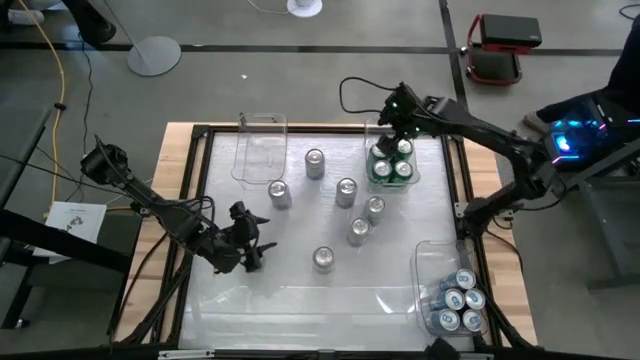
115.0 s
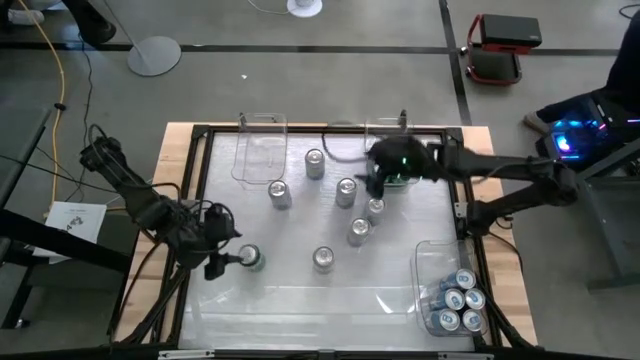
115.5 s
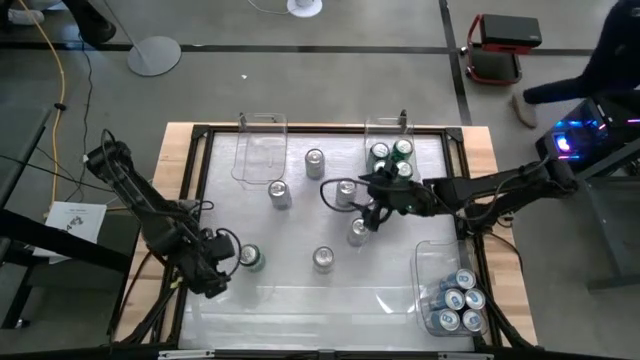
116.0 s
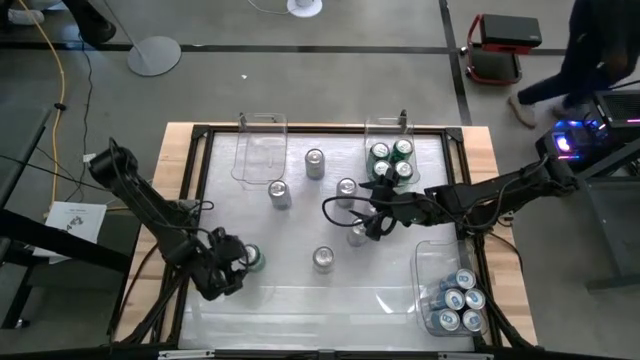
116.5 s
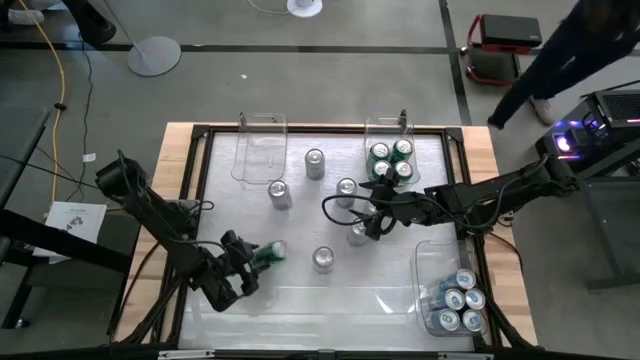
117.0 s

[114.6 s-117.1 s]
Task: Sort soda cans
Put the green soda can into the top right transparent bin

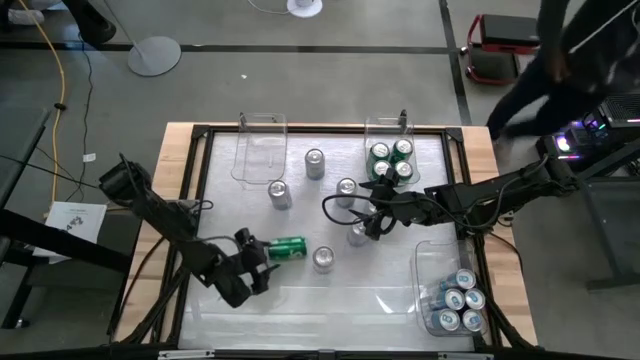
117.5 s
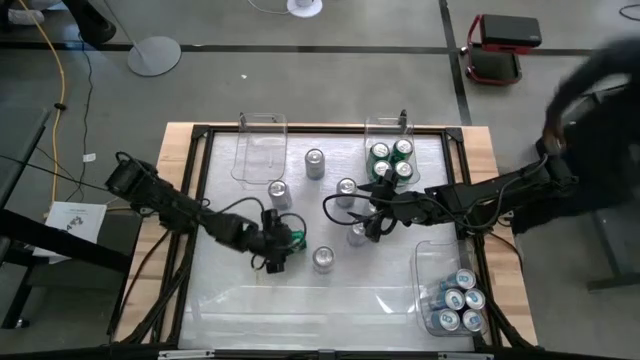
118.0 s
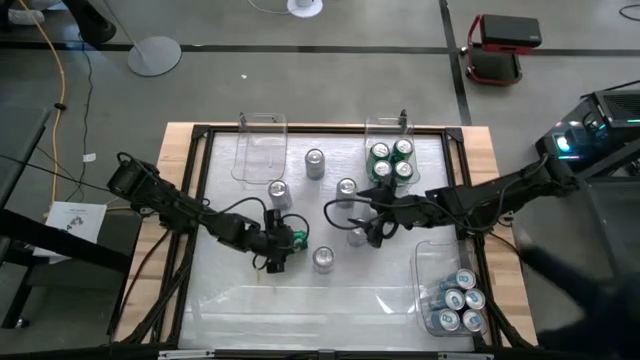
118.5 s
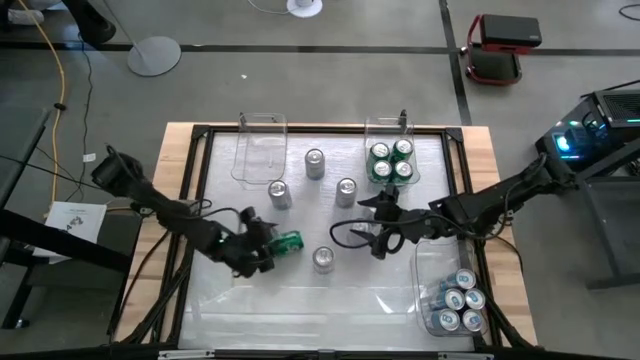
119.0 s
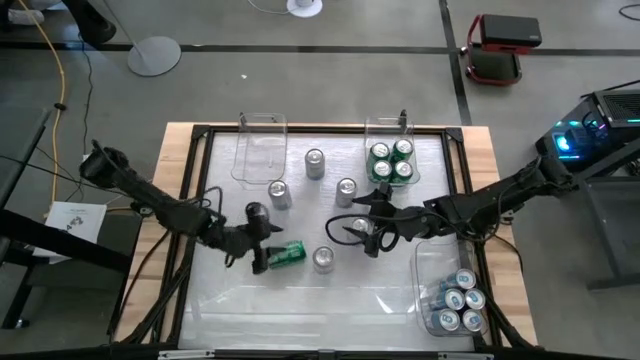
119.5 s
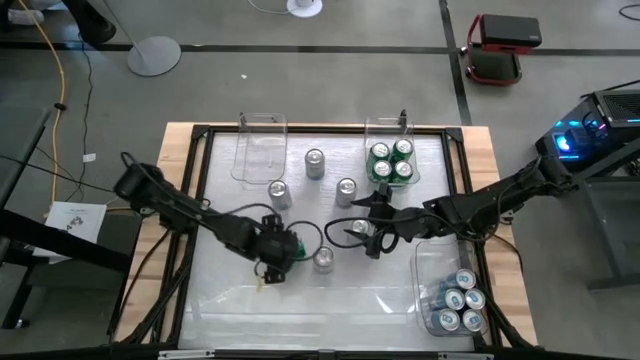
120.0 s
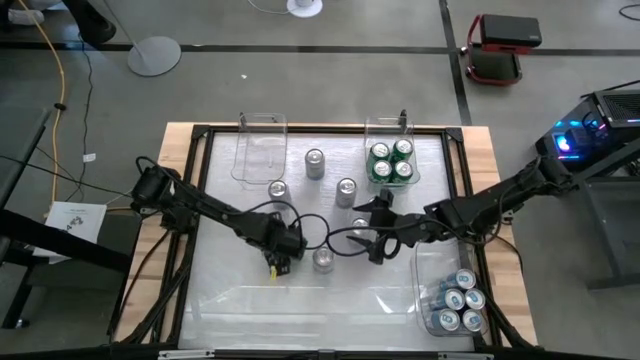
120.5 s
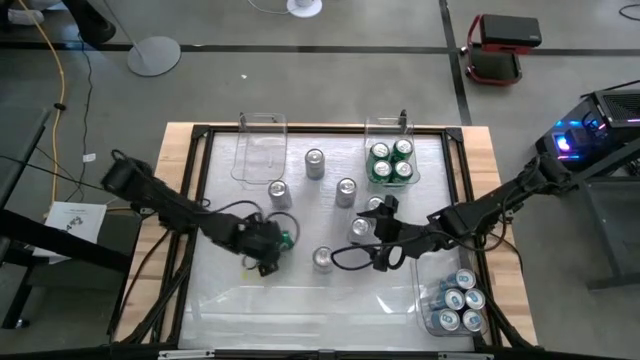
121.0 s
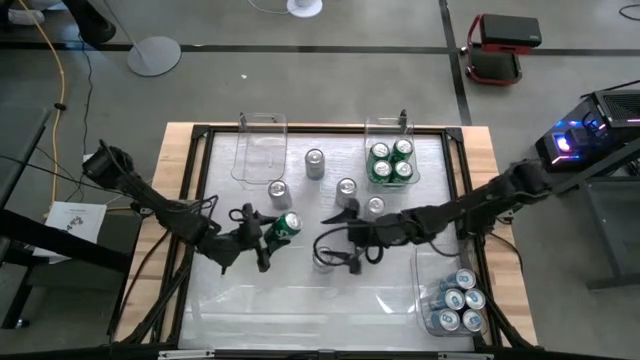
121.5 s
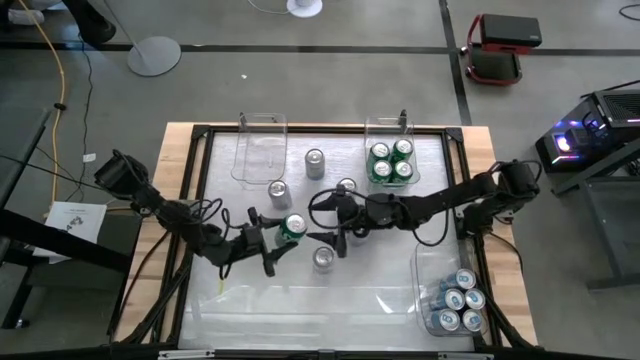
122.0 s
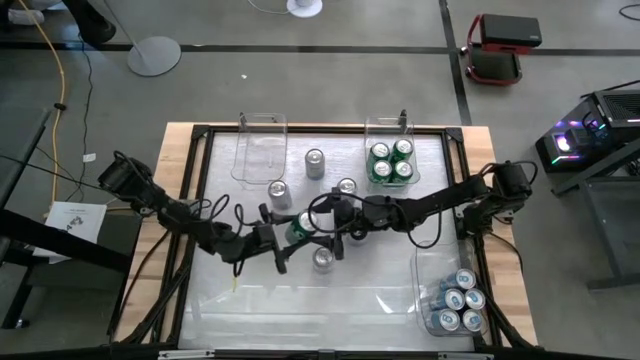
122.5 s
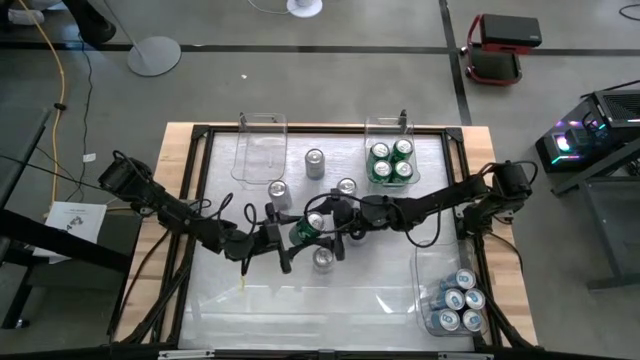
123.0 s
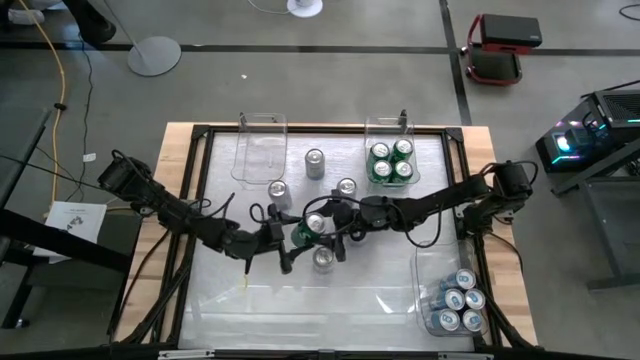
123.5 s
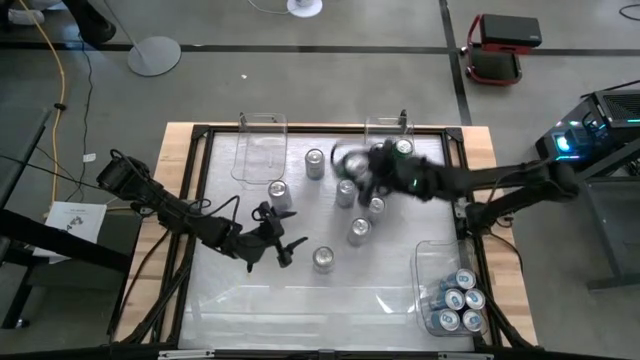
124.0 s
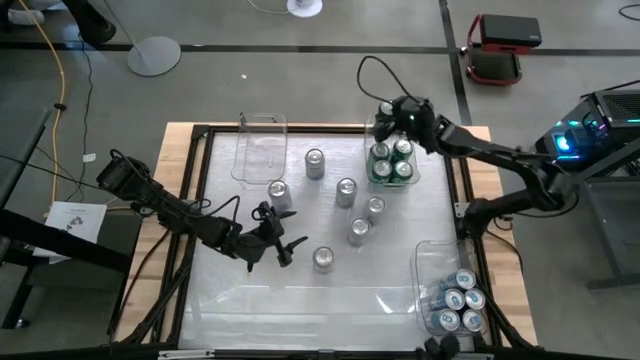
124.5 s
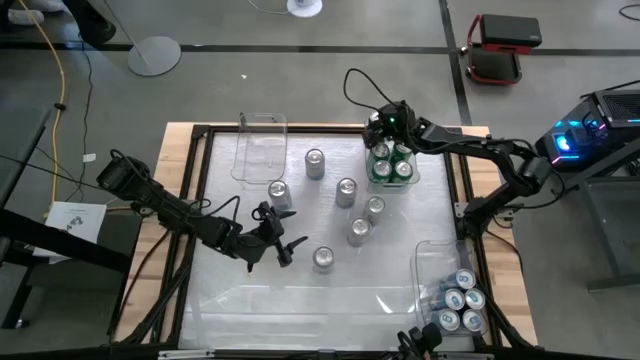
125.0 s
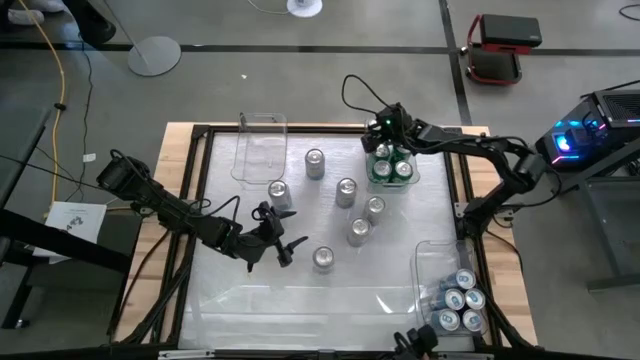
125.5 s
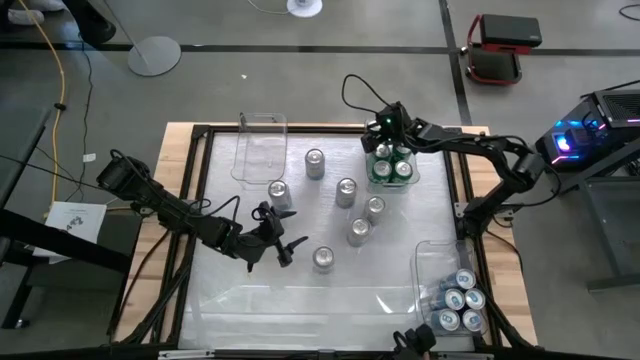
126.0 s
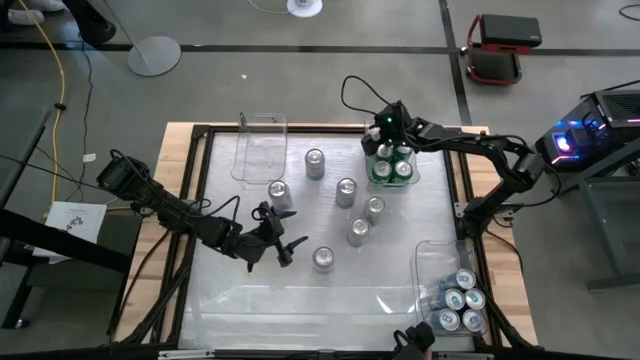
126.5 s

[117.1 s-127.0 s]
Put the green soda can into the top right transparent bin

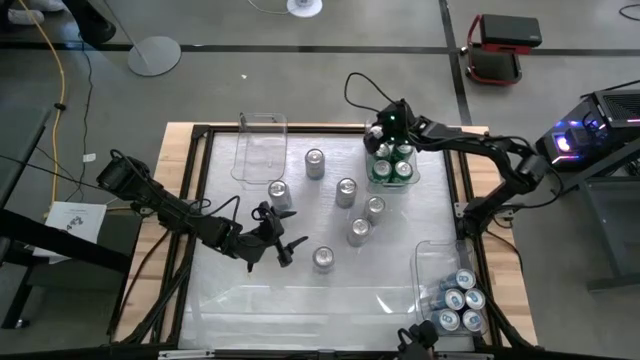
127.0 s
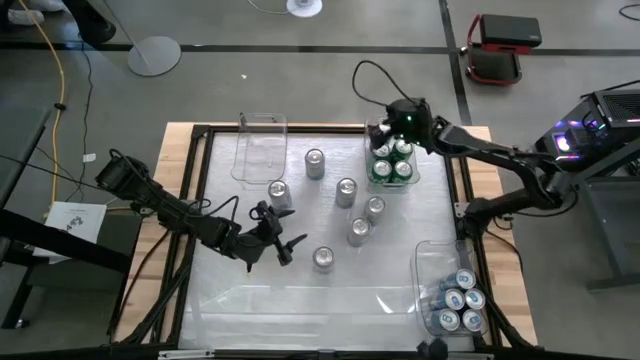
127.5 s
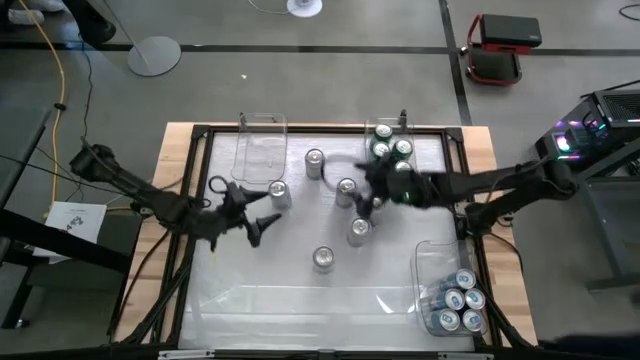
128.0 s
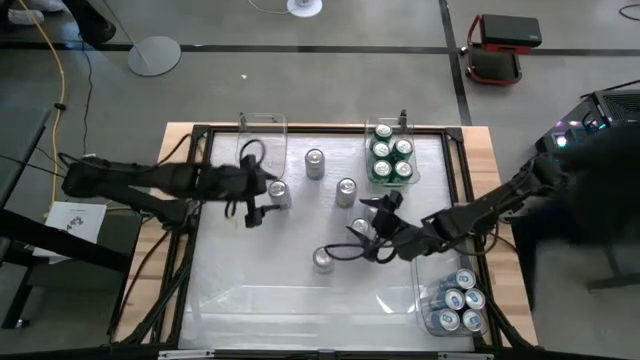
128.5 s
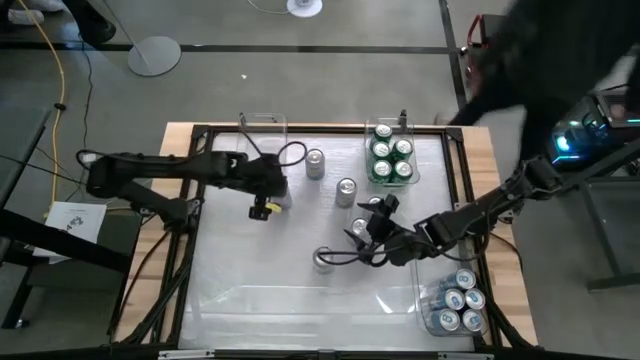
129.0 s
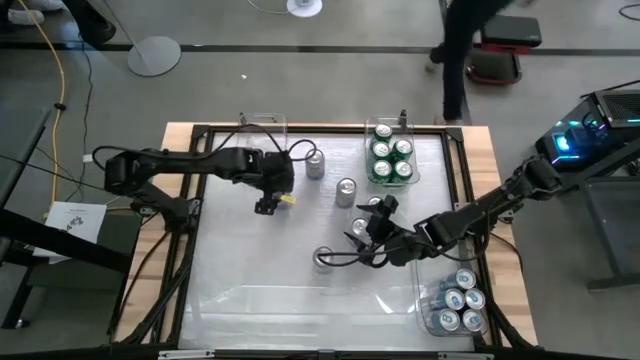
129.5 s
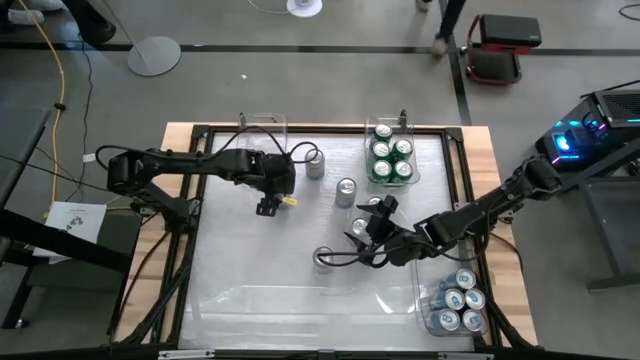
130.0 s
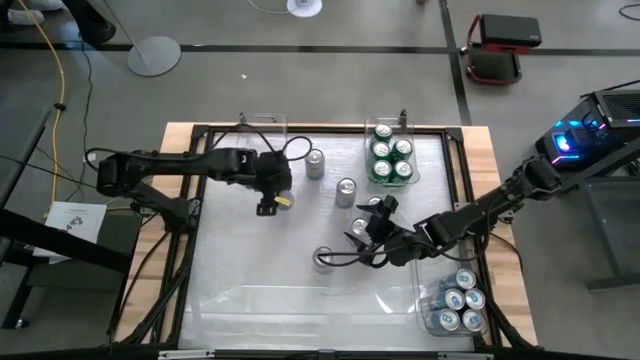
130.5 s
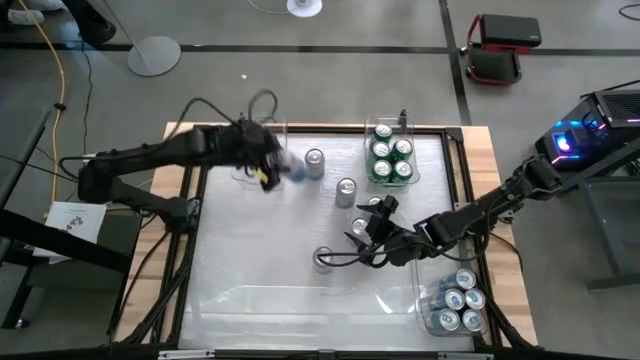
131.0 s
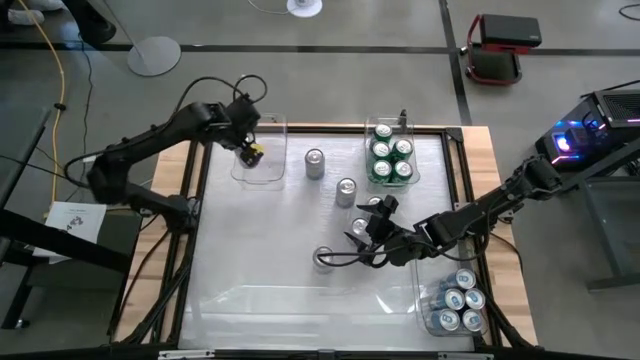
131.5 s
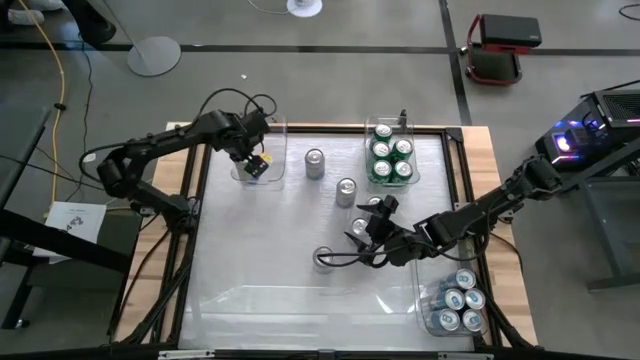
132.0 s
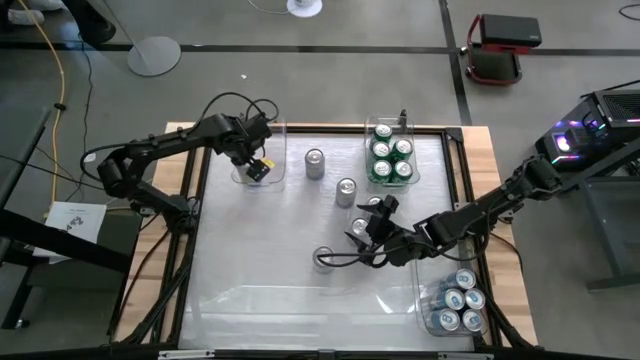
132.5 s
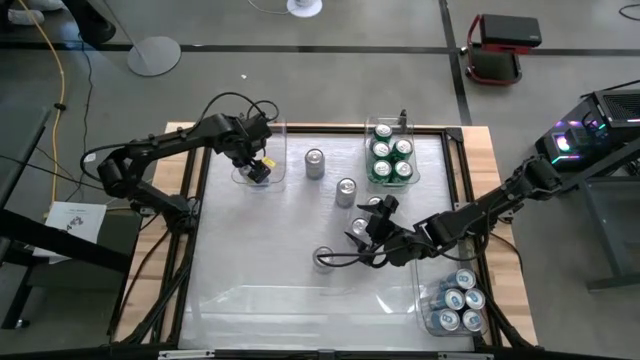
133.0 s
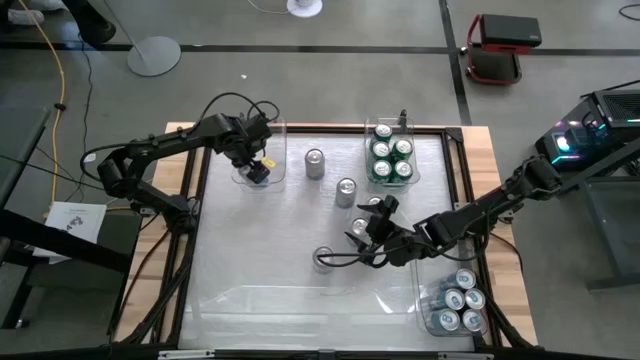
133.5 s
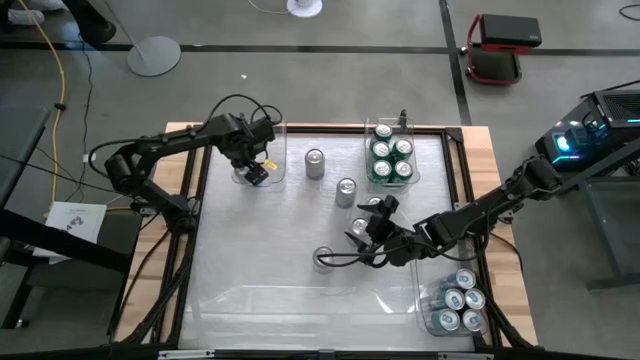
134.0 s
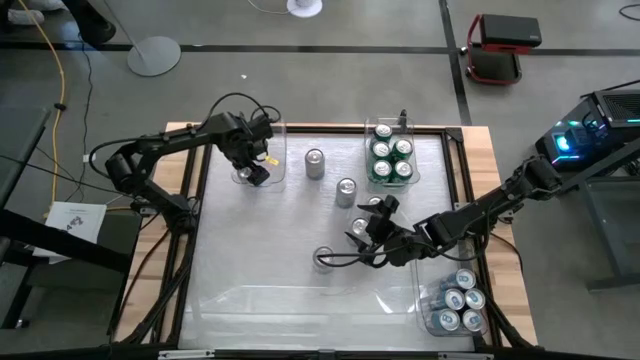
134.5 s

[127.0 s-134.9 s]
Put the blue-white soda can into the top left transparent bin
